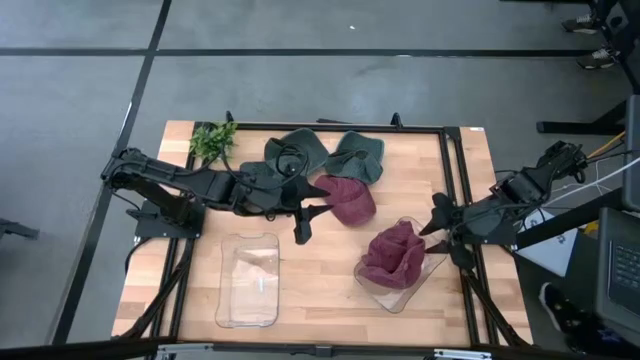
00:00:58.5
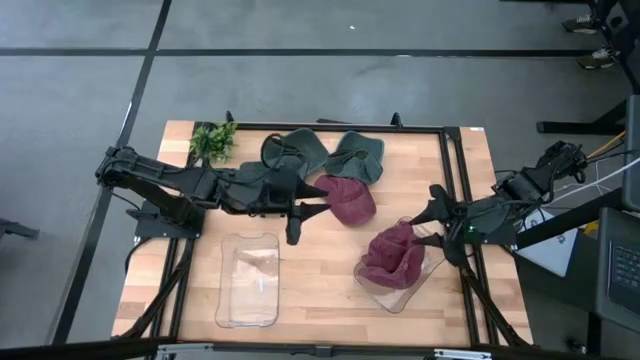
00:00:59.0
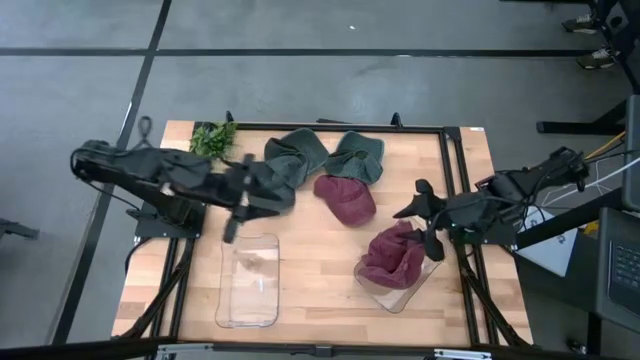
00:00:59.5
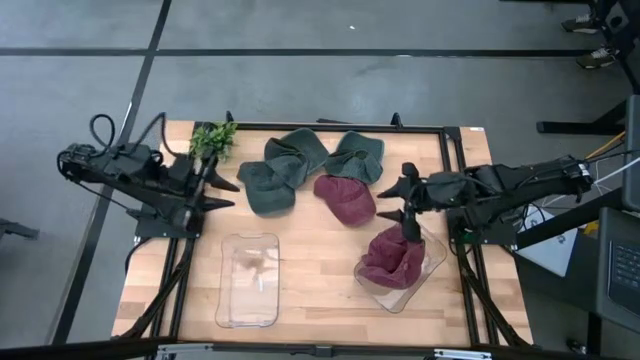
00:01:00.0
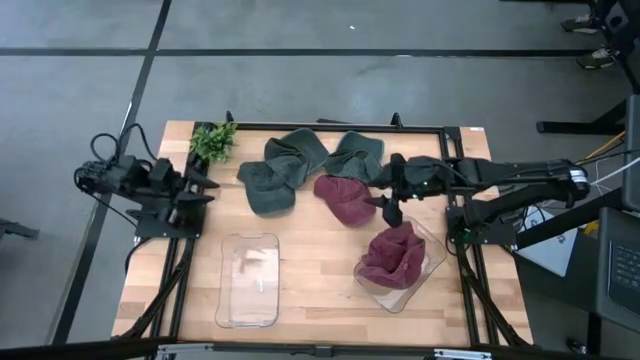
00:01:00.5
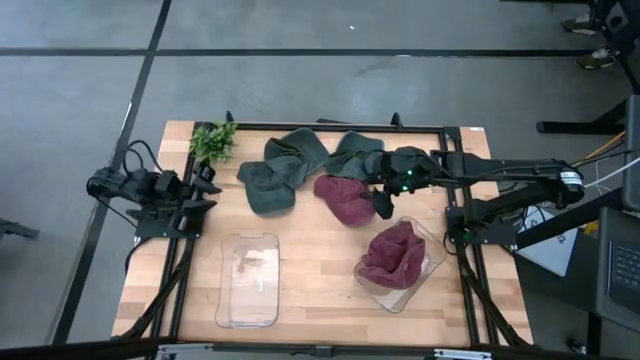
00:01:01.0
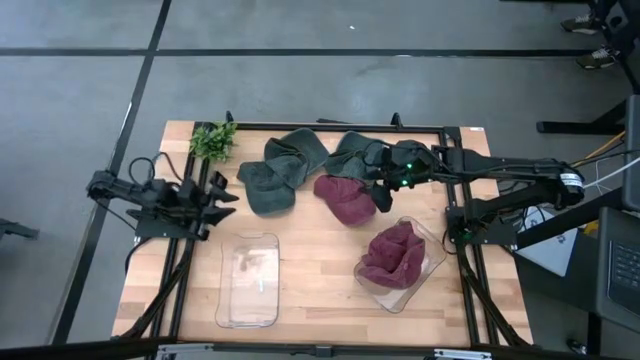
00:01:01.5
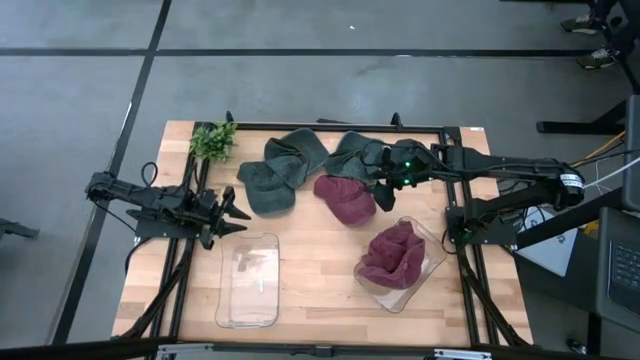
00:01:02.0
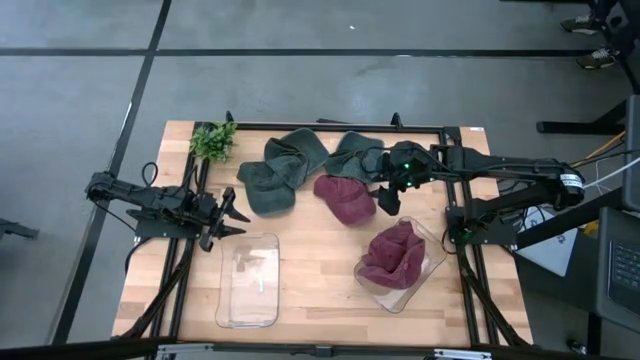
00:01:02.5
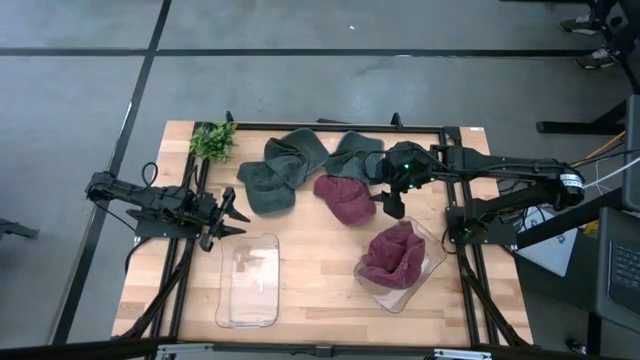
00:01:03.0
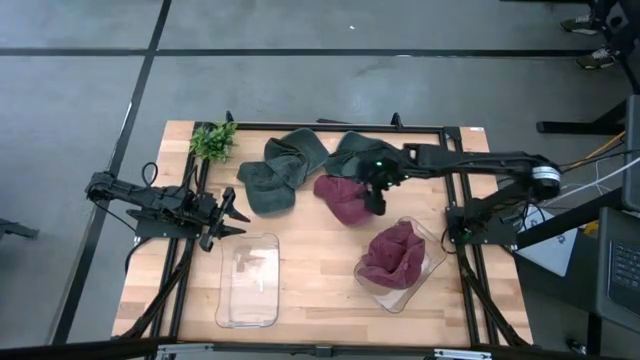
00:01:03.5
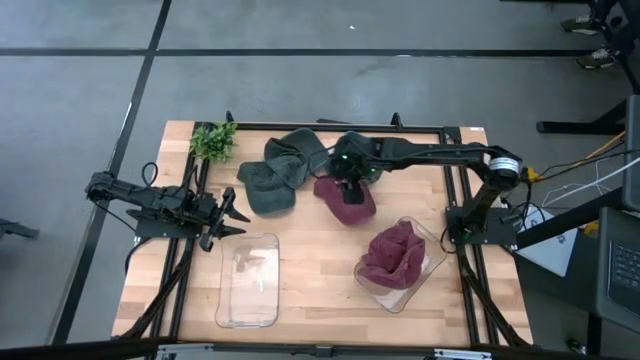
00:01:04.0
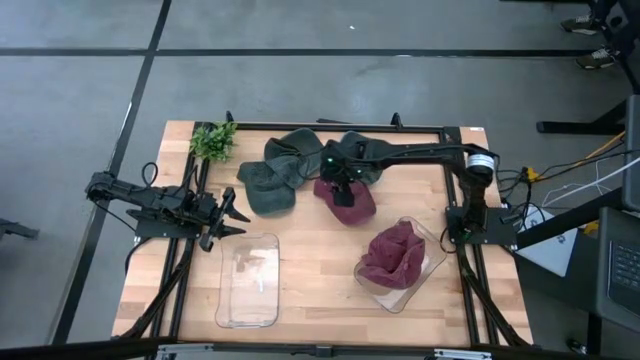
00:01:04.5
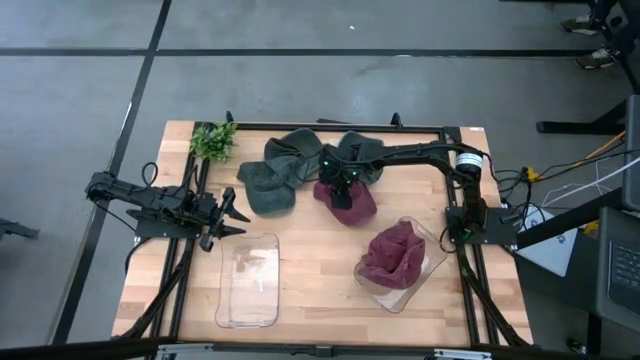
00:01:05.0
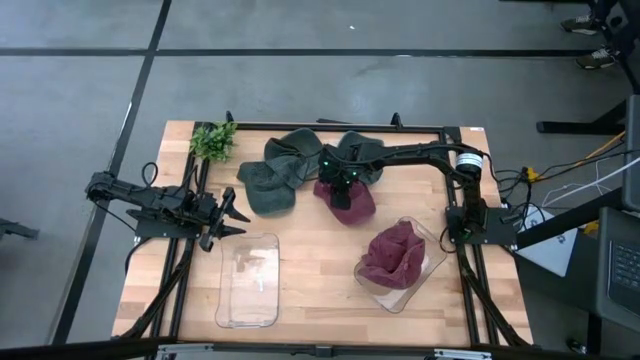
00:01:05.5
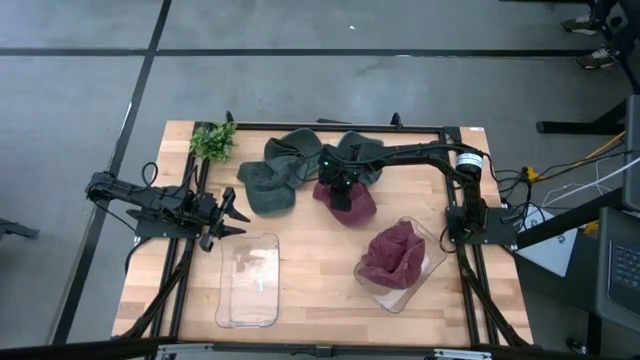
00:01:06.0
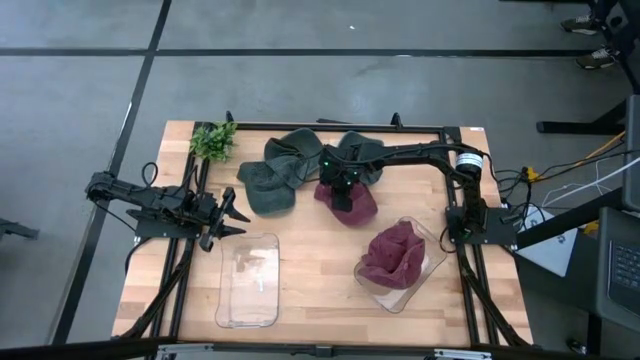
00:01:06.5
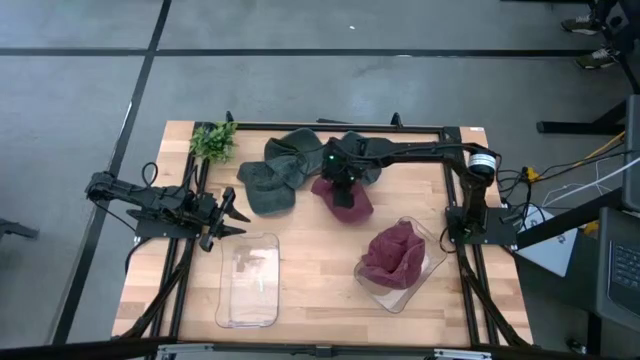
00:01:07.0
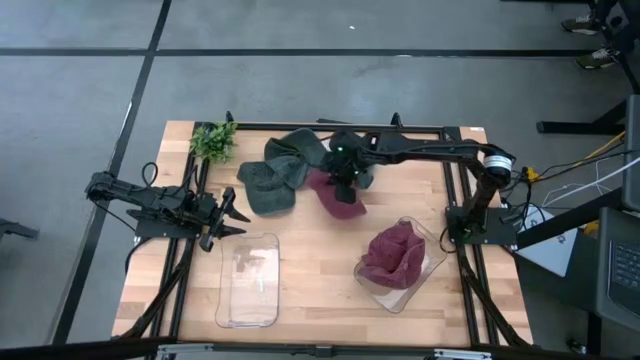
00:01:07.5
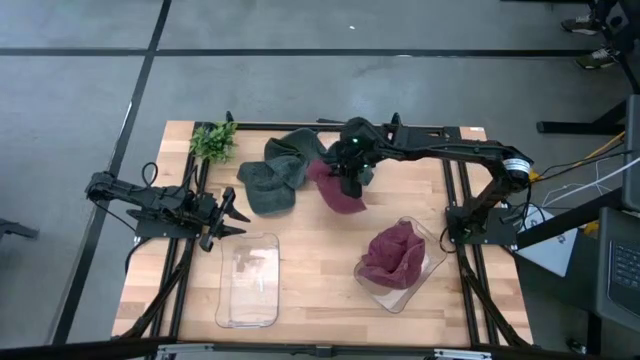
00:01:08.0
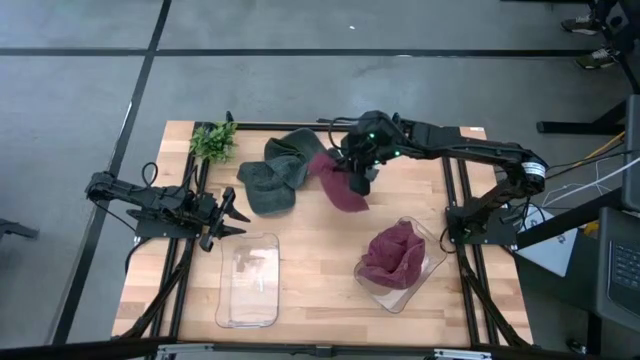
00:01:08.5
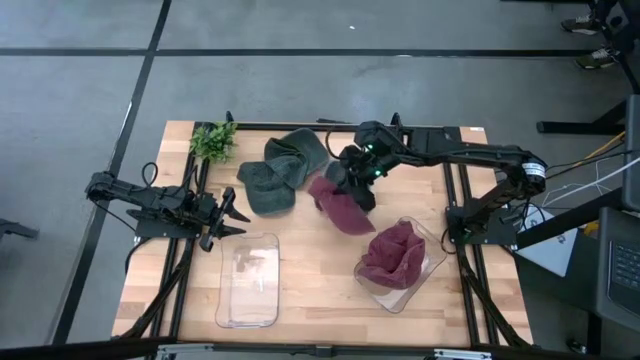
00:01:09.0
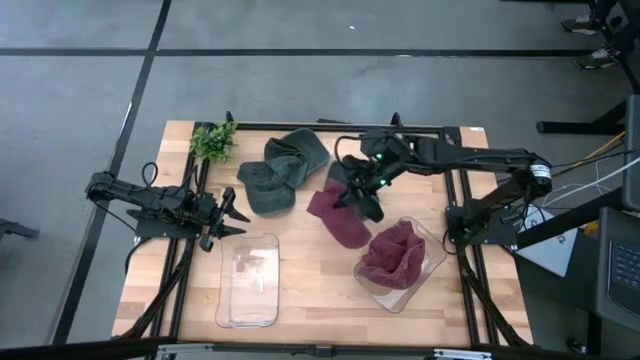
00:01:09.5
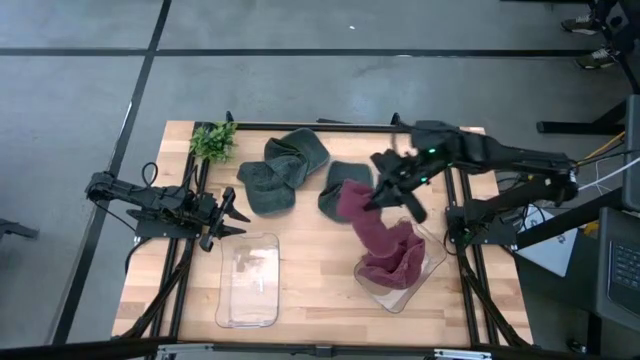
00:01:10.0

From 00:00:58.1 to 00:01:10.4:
Task: Pick & Place hat
Put the red cap into the right transparent bin

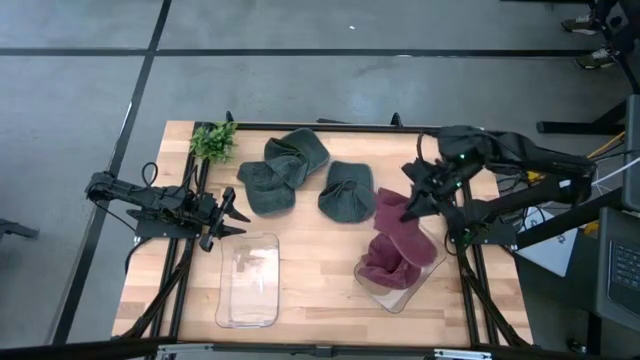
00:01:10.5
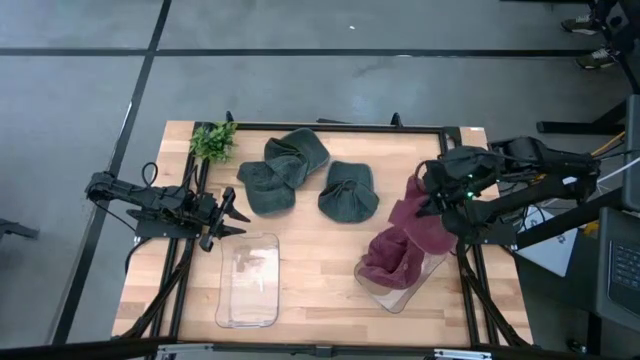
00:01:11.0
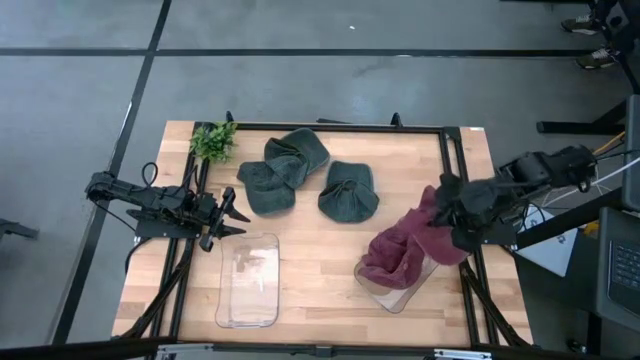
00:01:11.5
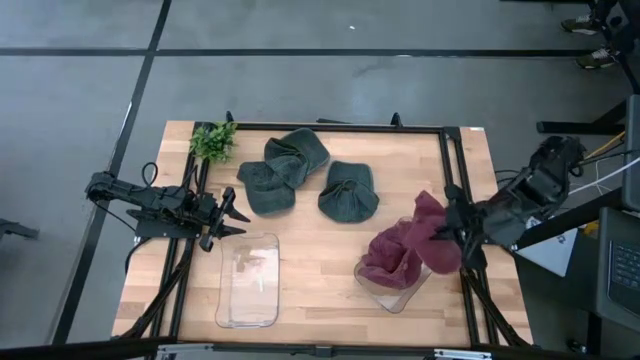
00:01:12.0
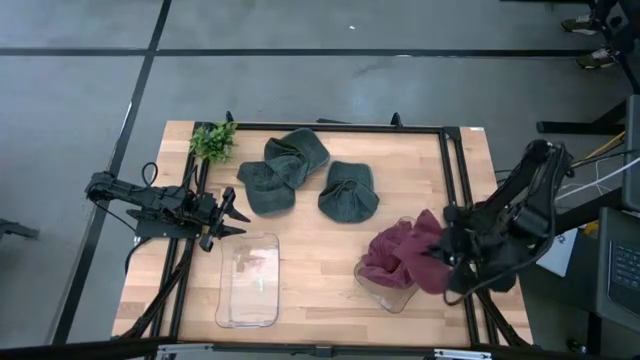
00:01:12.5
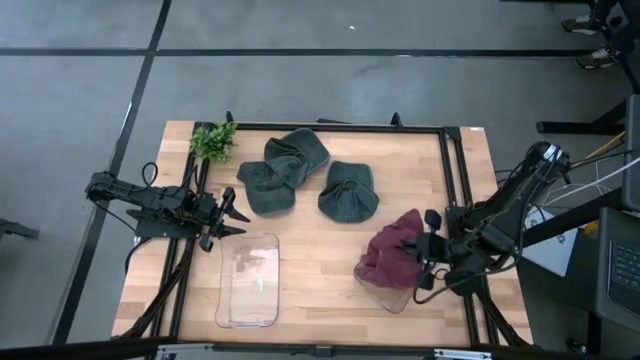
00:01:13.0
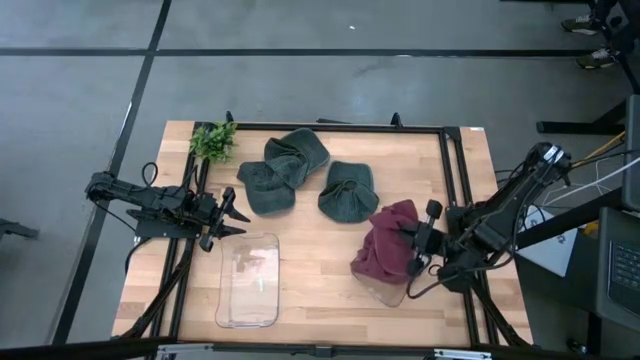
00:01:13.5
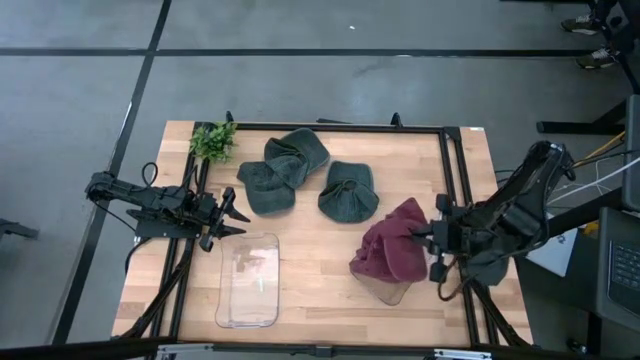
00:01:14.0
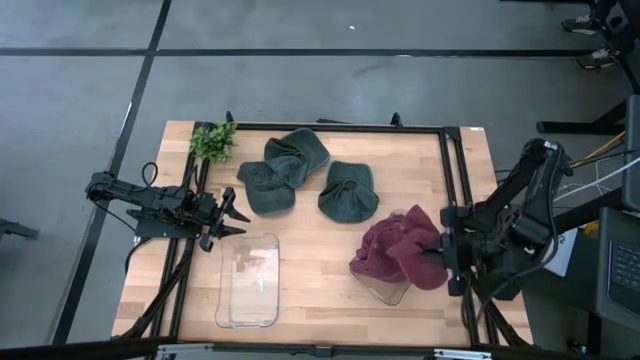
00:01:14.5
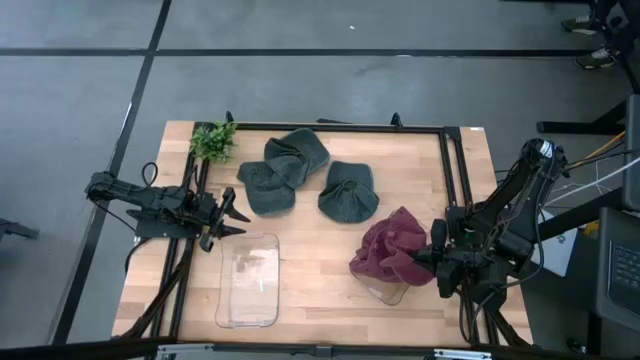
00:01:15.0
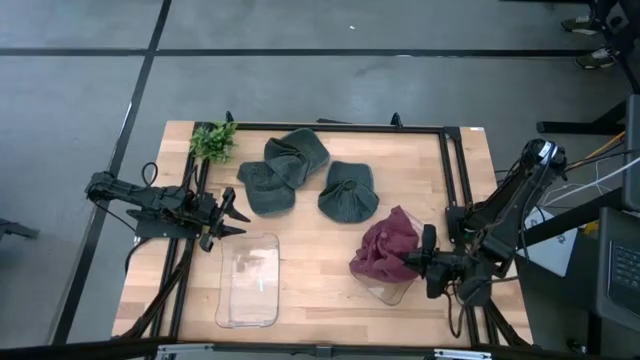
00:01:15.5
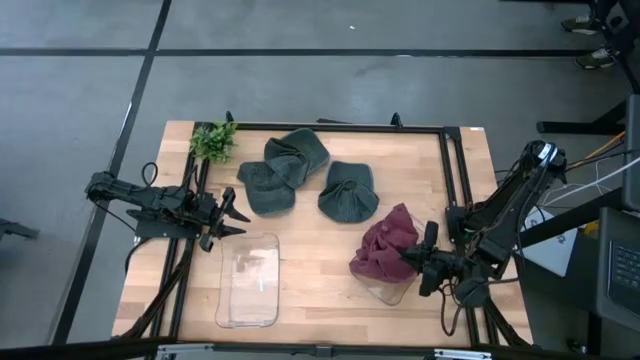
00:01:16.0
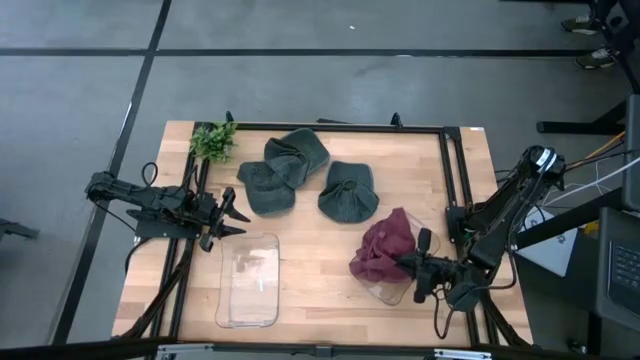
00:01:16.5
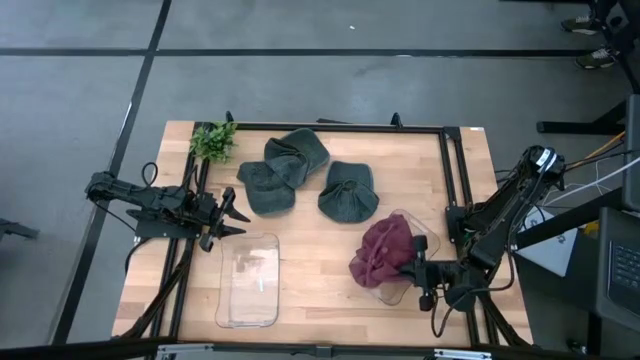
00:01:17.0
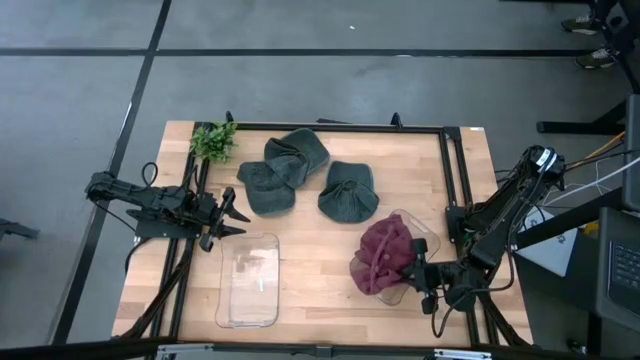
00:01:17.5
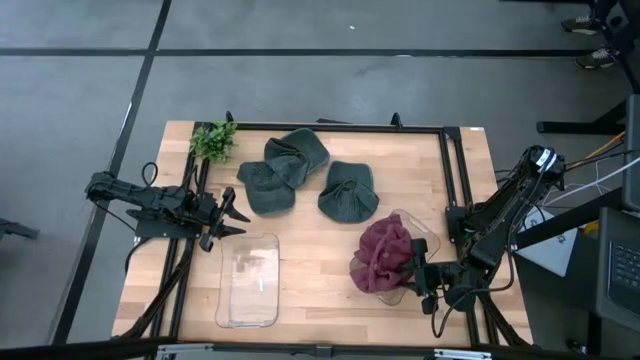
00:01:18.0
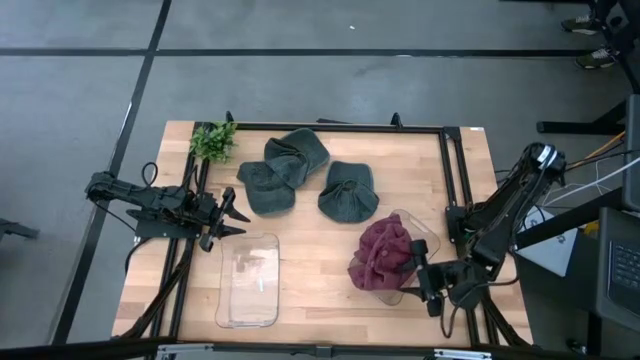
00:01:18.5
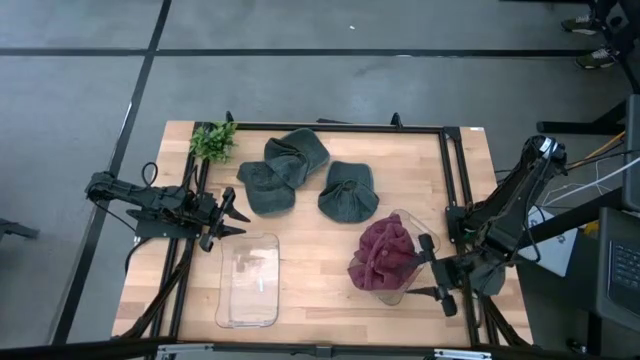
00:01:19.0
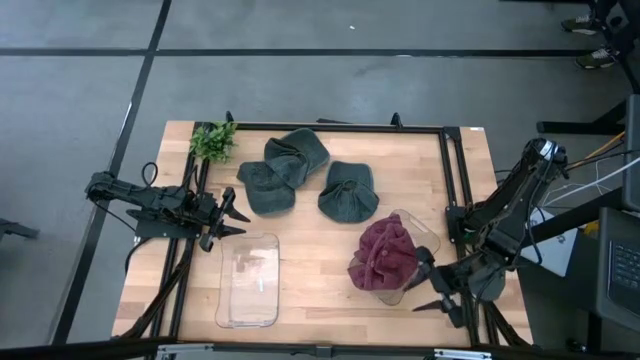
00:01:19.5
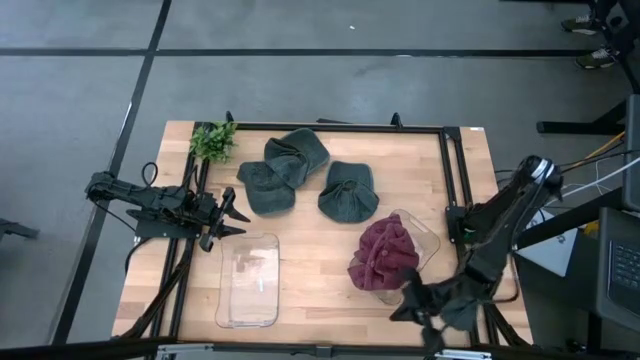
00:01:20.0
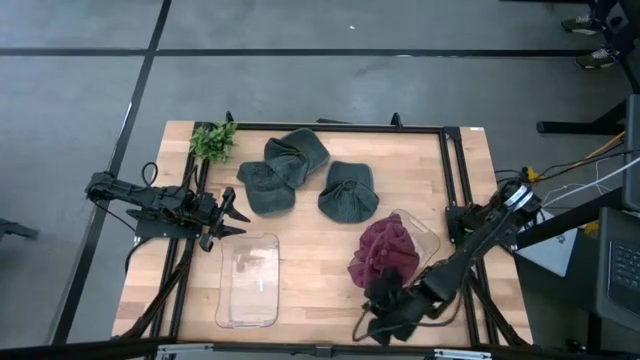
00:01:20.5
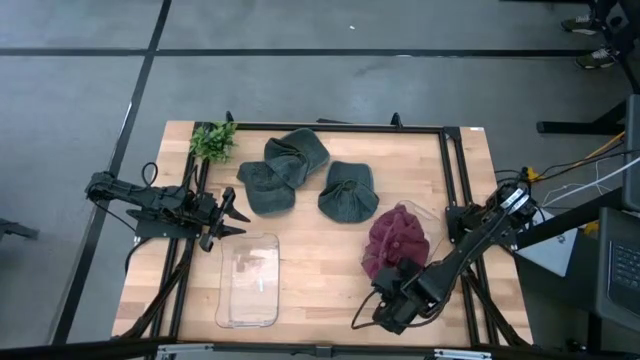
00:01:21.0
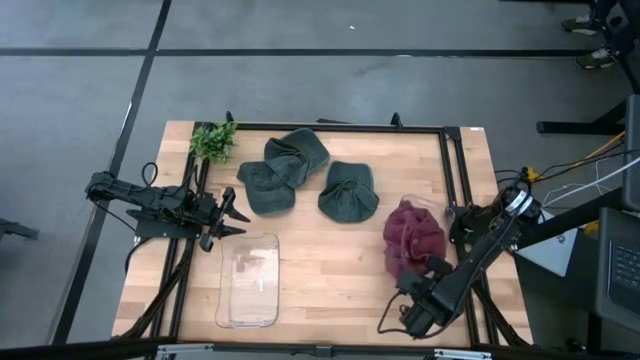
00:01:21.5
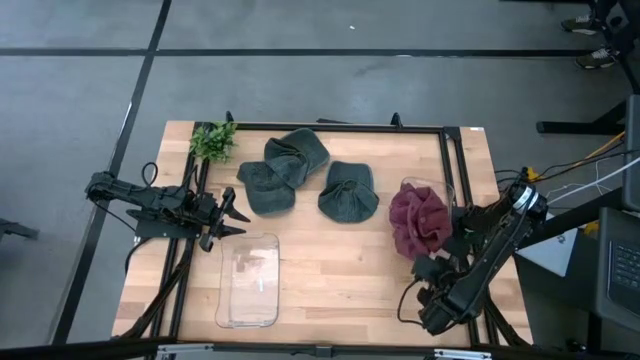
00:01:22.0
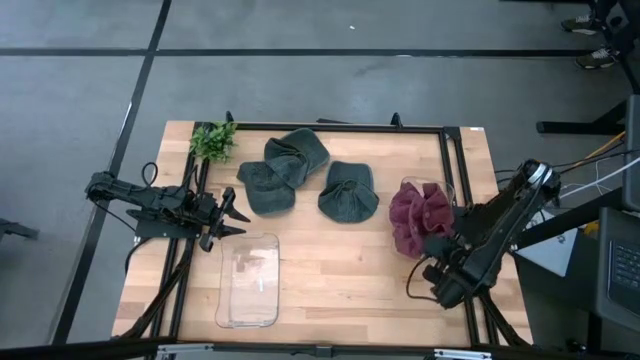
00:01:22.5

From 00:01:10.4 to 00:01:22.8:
Put the red cap into the right transparent bin
